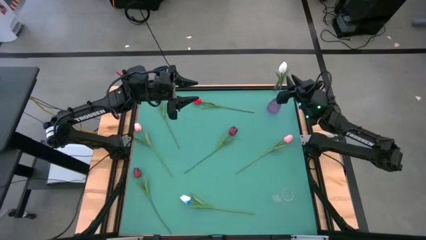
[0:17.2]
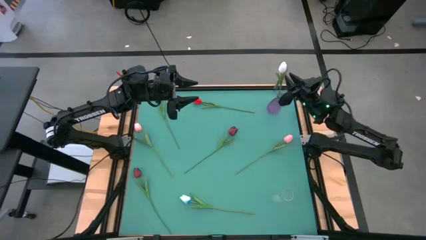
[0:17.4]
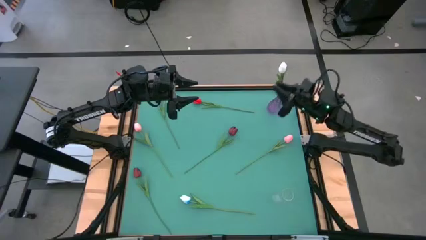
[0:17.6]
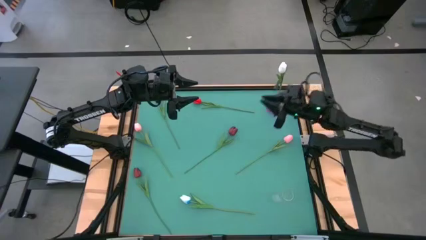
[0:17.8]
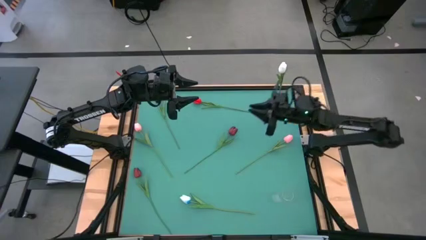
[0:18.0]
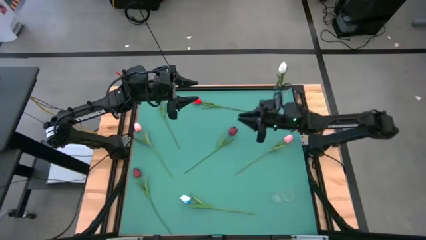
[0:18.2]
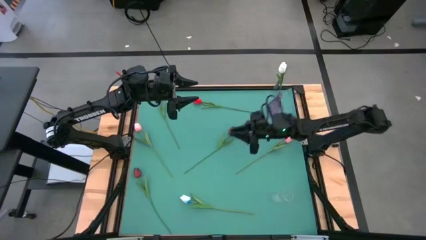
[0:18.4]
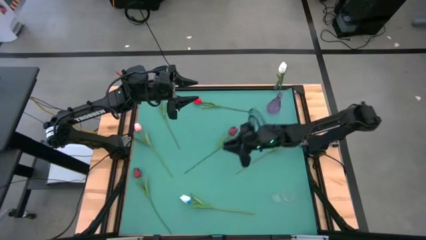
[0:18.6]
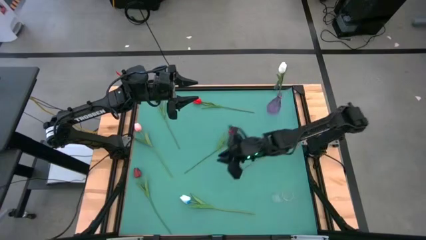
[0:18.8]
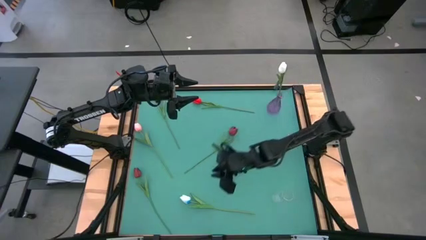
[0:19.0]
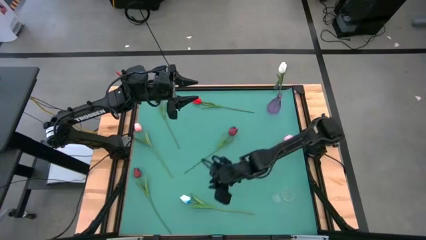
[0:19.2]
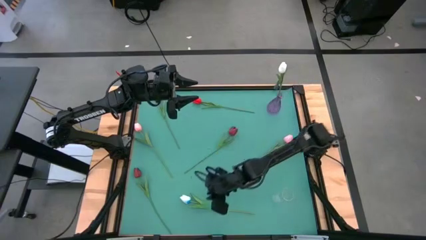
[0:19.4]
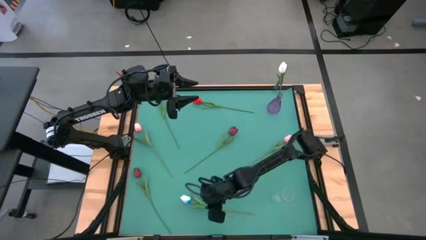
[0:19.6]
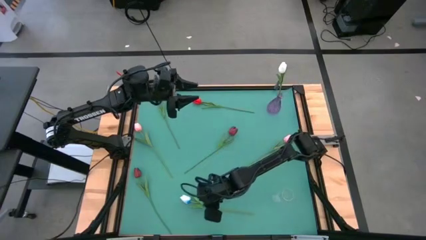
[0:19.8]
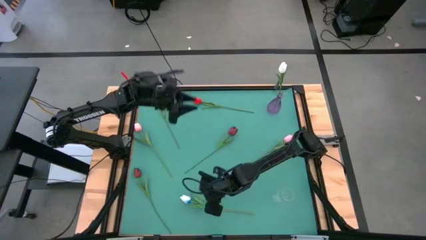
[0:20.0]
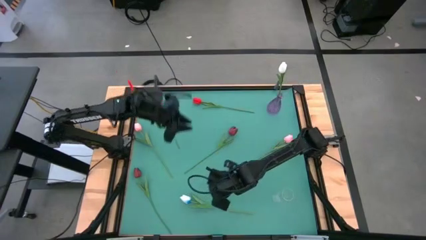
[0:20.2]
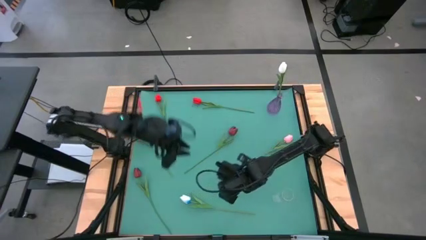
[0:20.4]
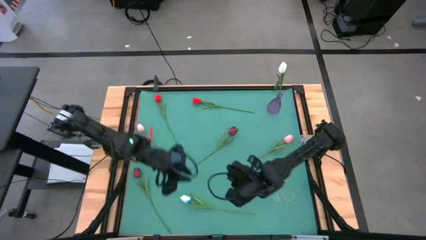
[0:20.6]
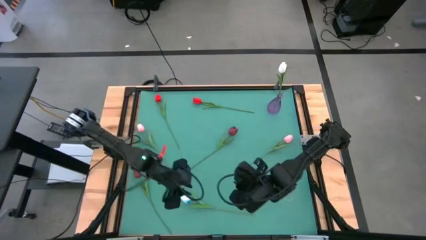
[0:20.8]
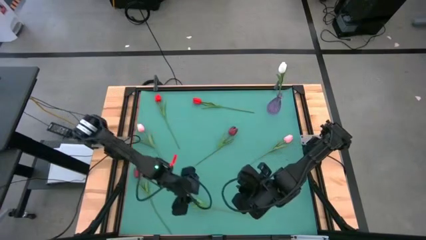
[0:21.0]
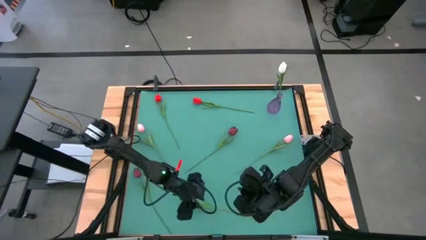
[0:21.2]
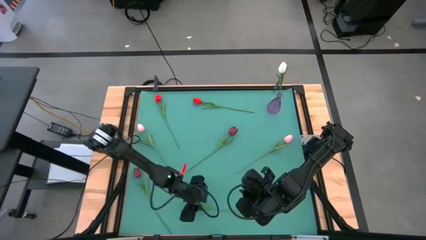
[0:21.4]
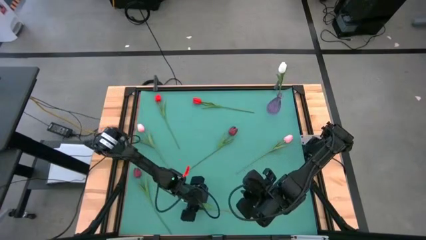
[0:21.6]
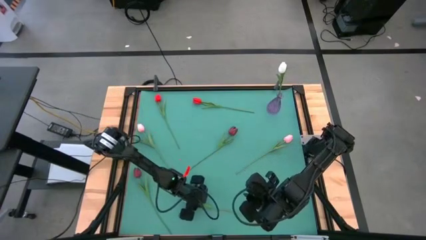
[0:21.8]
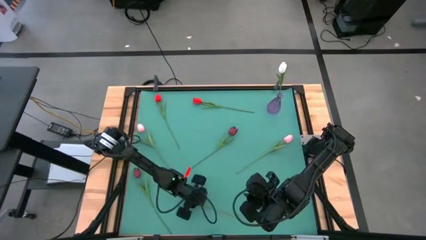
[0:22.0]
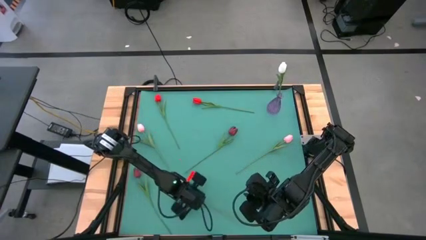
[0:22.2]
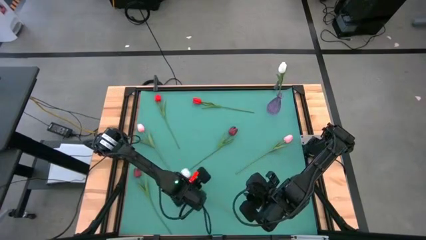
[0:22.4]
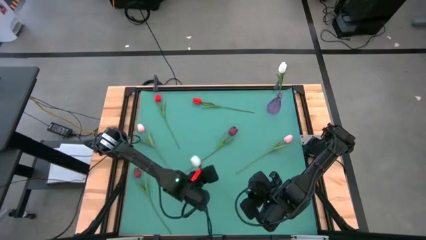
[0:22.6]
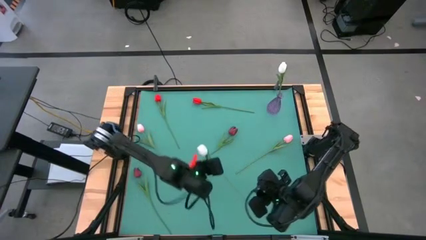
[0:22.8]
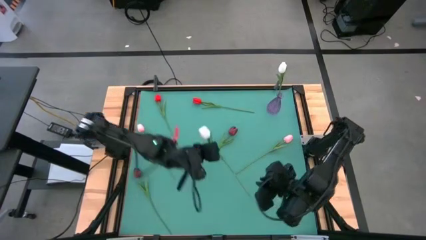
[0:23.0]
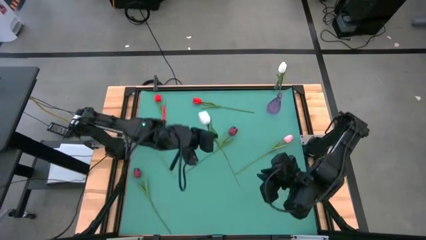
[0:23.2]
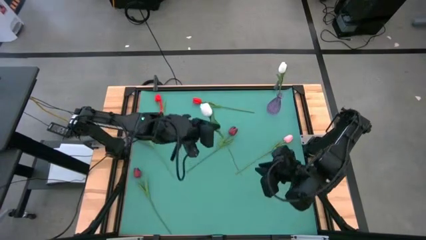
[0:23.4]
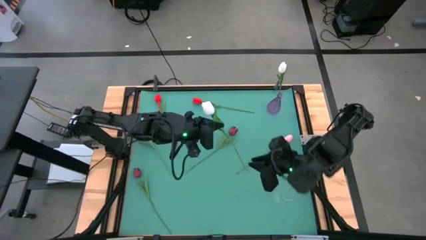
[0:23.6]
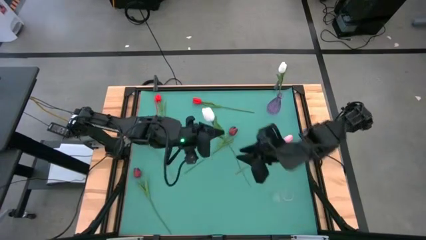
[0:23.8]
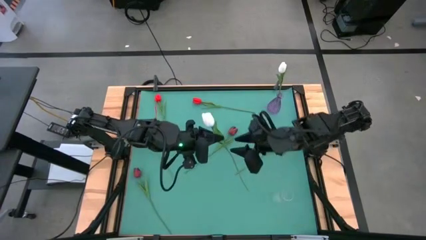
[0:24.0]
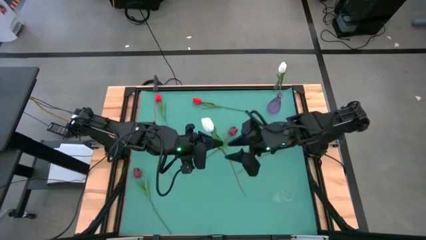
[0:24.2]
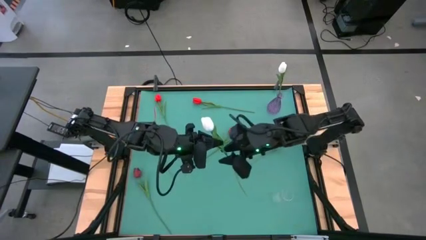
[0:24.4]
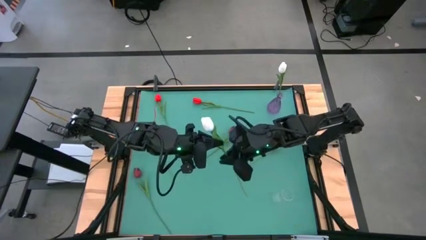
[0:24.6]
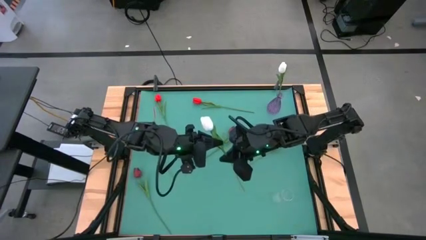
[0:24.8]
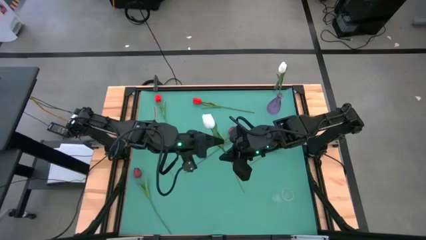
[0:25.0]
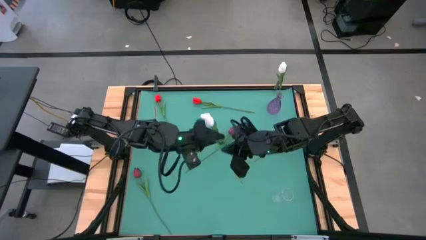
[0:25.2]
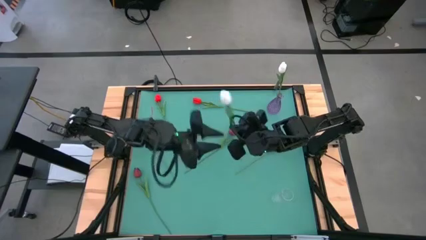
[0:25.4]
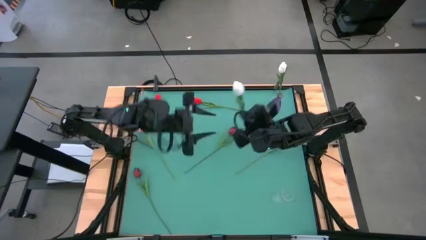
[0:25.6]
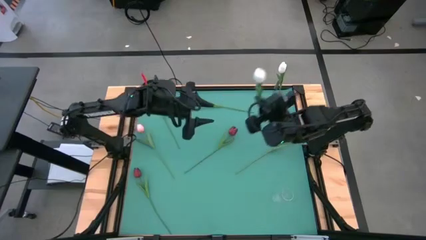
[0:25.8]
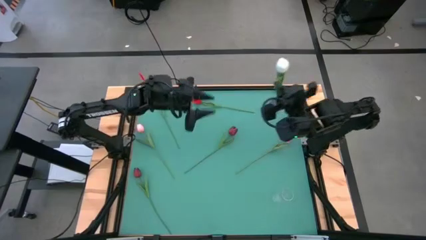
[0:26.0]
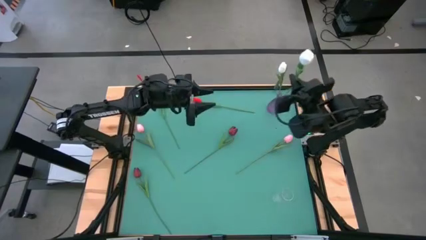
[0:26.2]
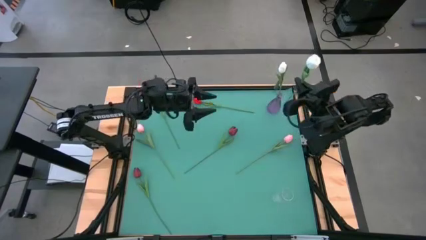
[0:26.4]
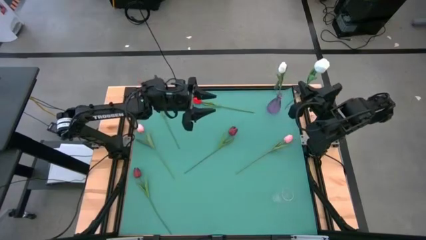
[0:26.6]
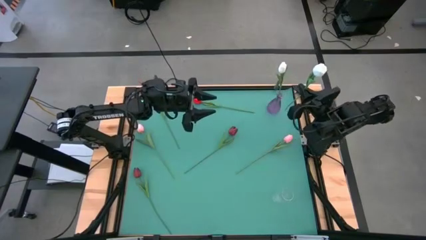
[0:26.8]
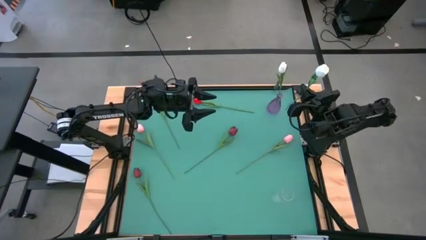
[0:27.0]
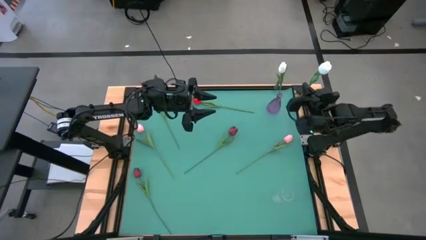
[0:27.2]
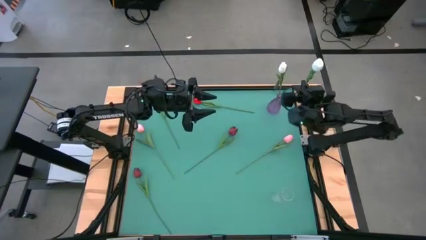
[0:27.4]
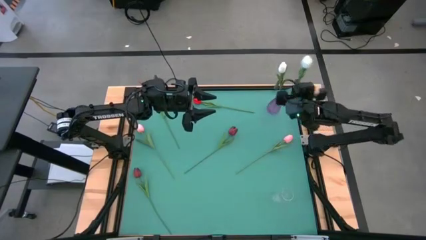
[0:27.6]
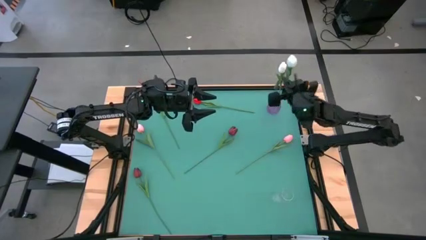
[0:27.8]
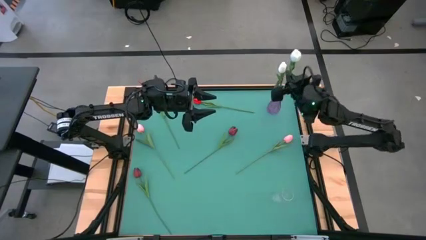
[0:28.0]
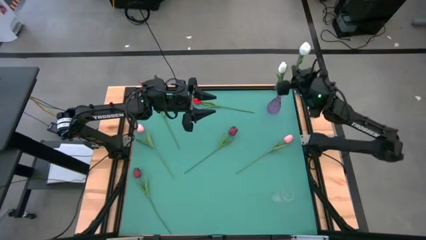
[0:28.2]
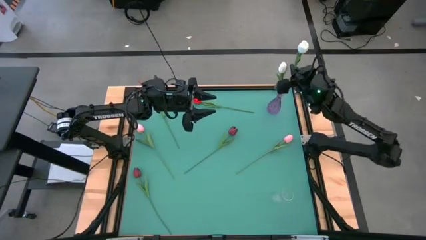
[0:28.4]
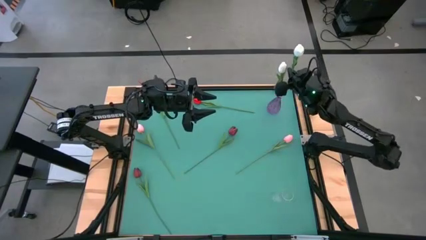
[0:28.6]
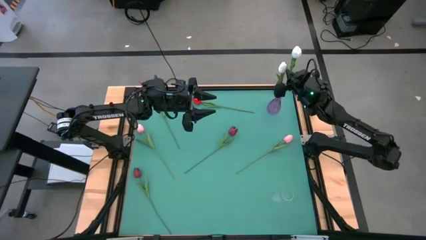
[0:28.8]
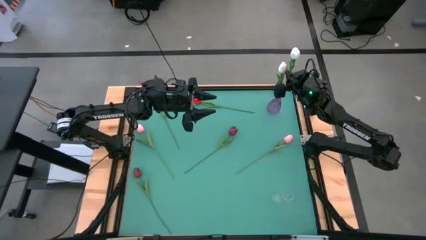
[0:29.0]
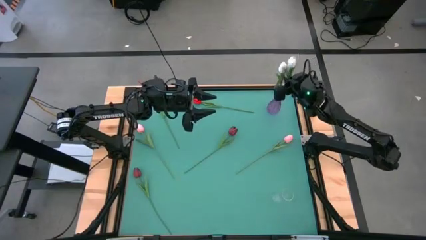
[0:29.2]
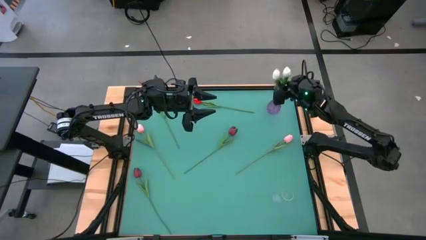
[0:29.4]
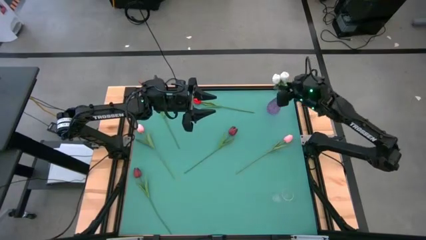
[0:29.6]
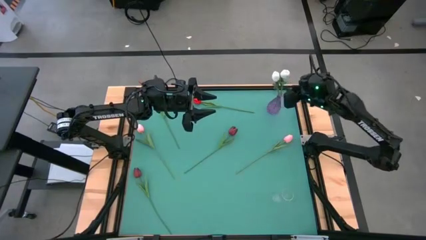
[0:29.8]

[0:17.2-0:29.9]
Task: Sort flowers into vase by color
Put the white flower into the violet vase
